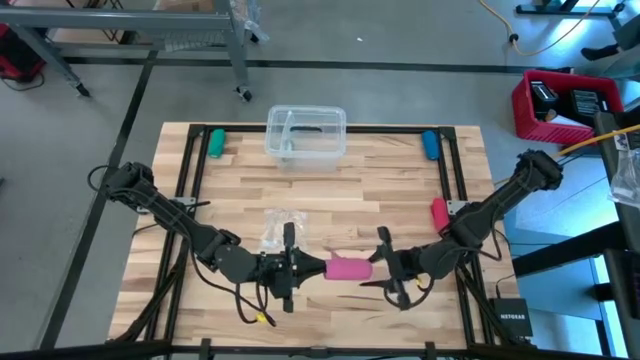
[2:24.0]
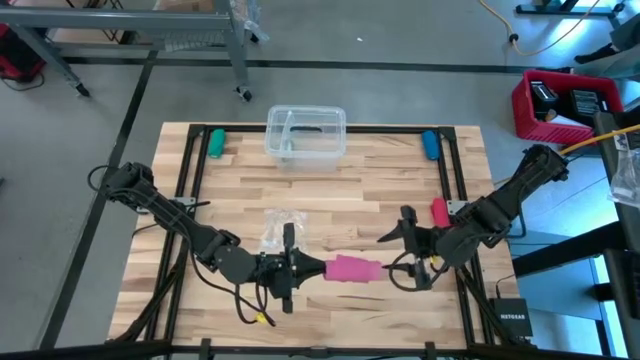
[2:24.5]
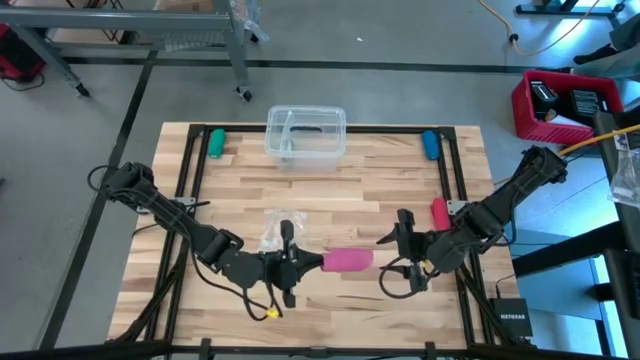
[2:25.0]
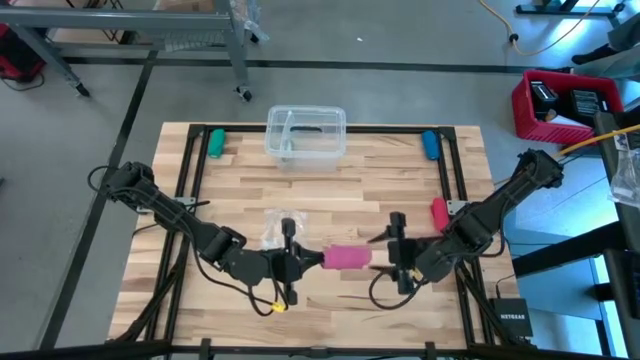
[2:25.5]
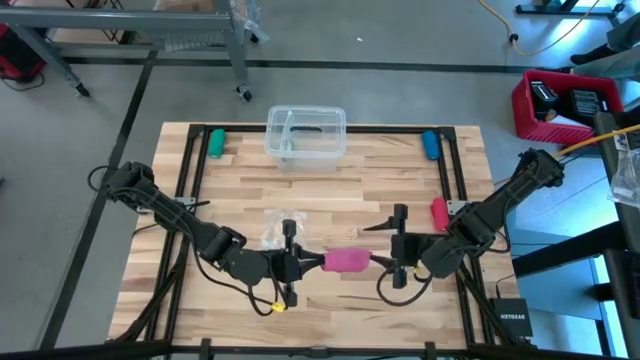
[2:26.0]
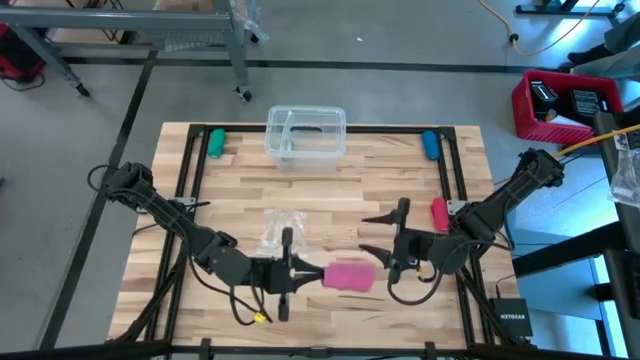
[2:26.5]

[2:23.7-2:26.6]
Task: Roll bandage
Roll the pink bandage

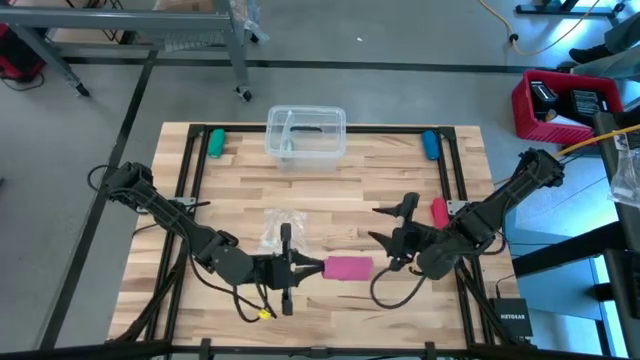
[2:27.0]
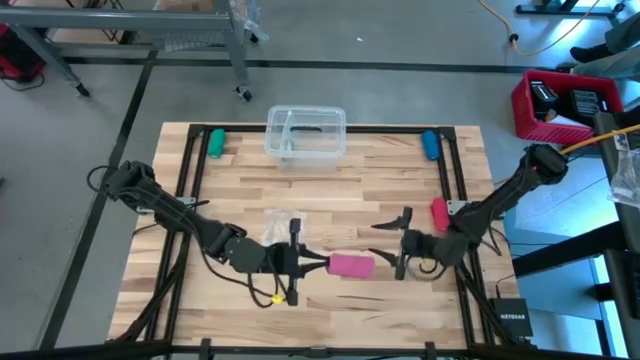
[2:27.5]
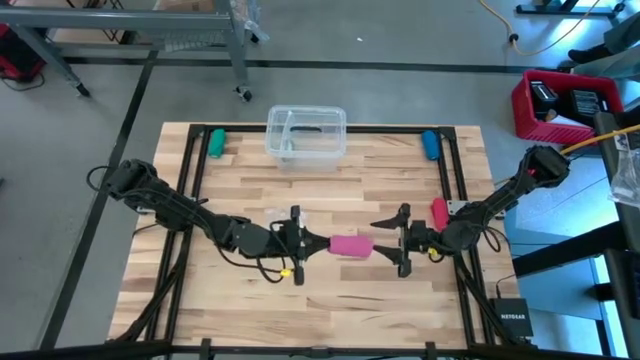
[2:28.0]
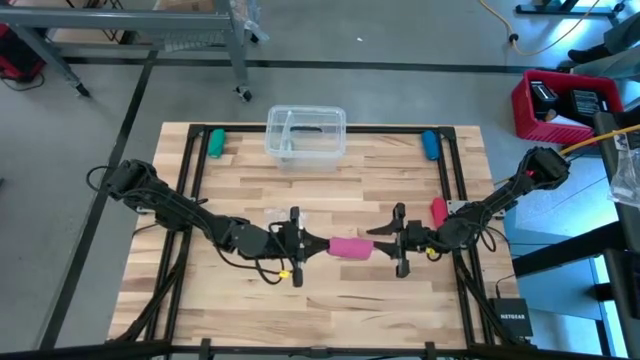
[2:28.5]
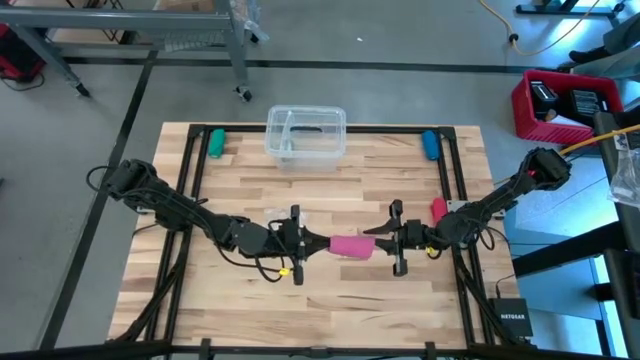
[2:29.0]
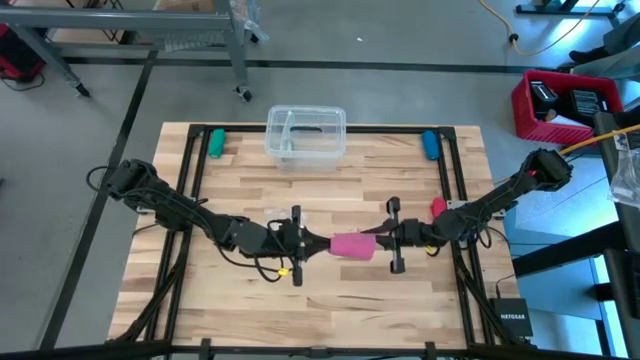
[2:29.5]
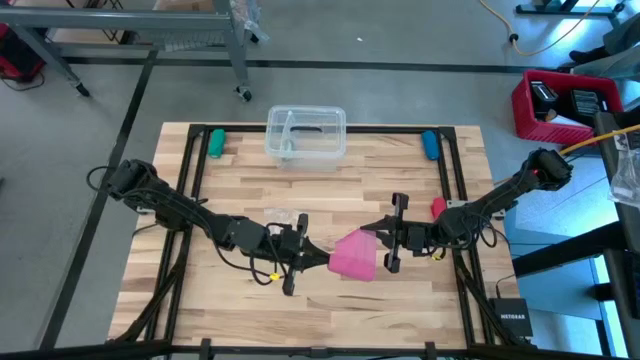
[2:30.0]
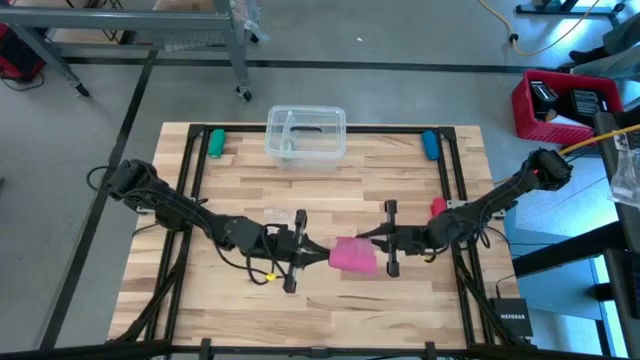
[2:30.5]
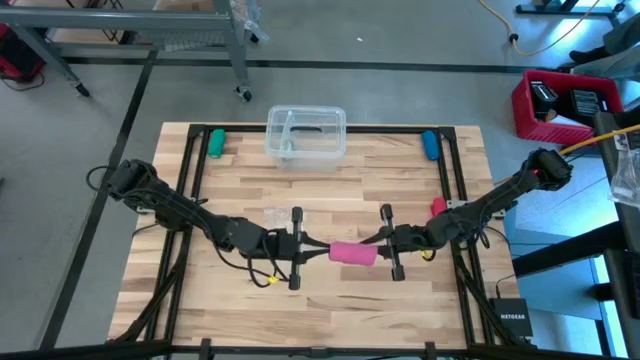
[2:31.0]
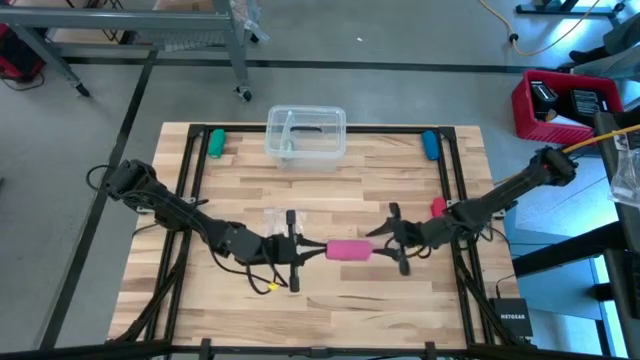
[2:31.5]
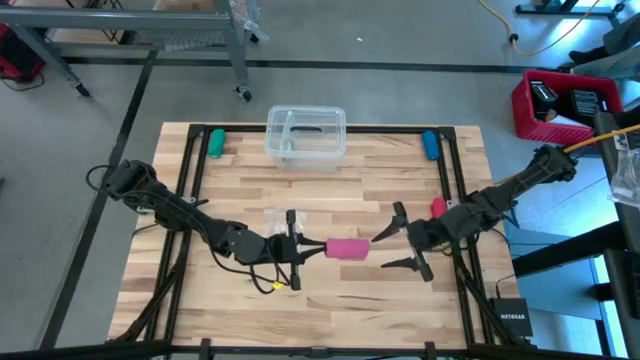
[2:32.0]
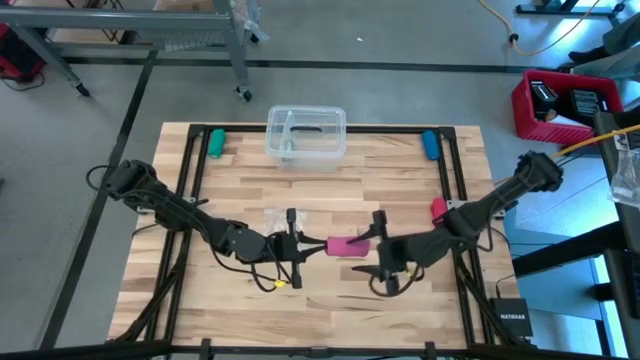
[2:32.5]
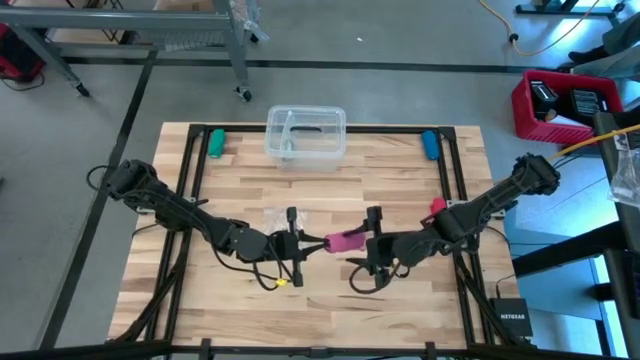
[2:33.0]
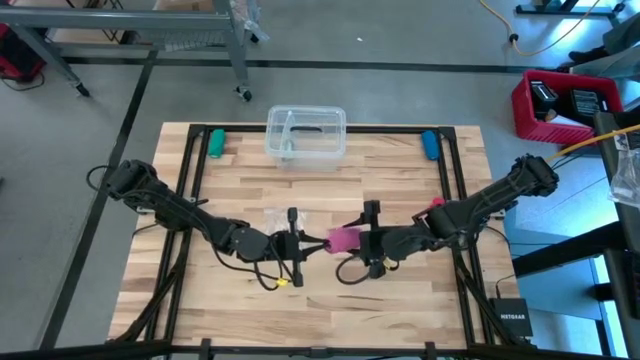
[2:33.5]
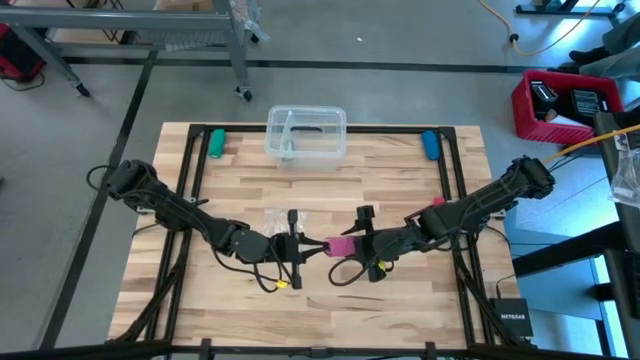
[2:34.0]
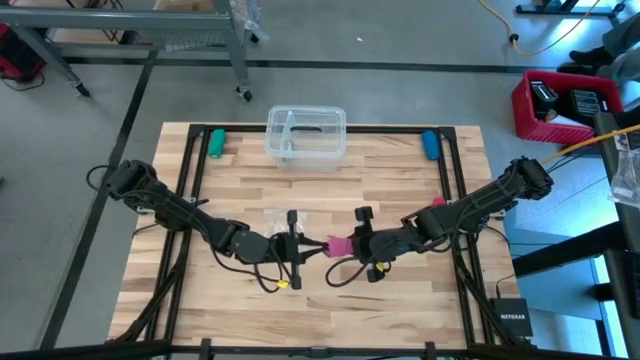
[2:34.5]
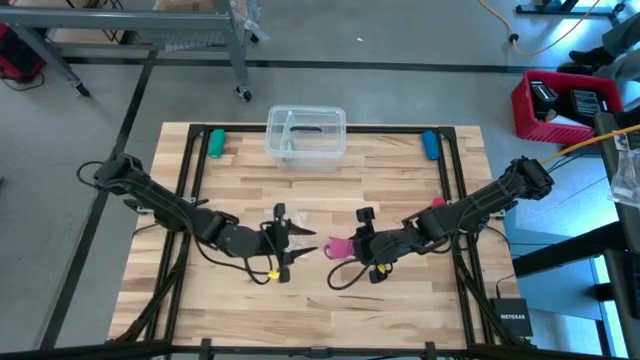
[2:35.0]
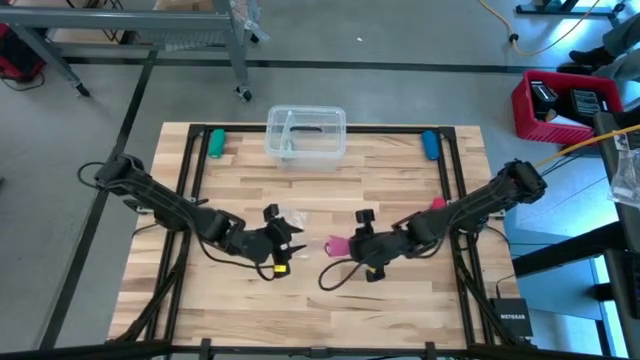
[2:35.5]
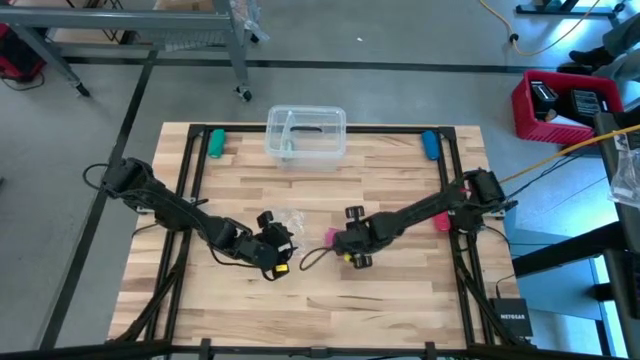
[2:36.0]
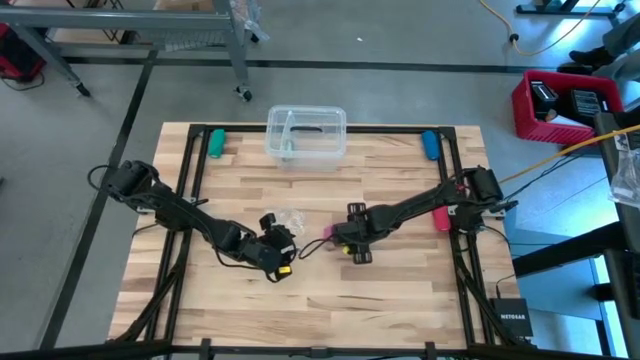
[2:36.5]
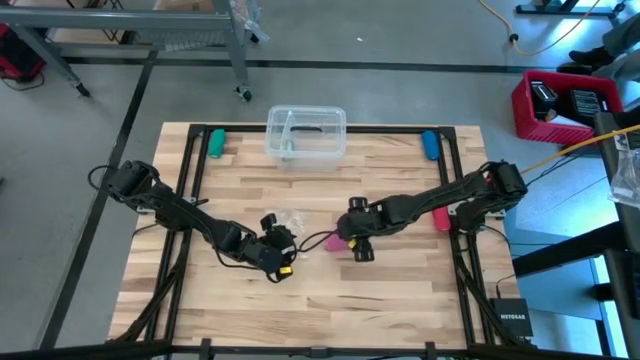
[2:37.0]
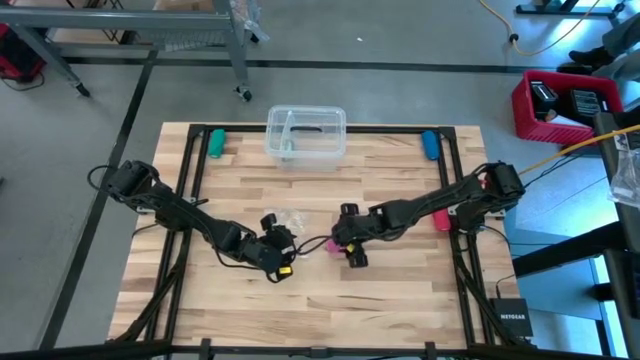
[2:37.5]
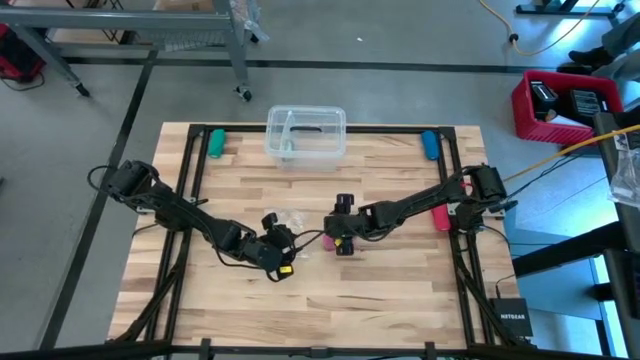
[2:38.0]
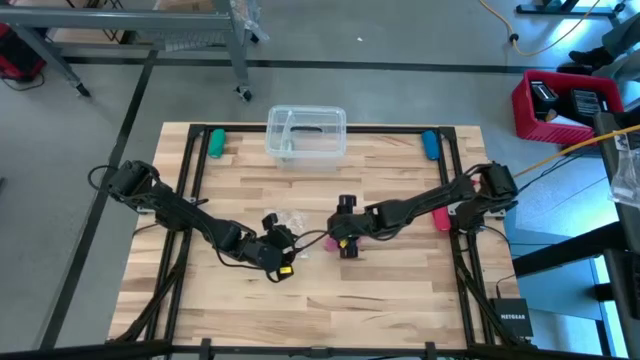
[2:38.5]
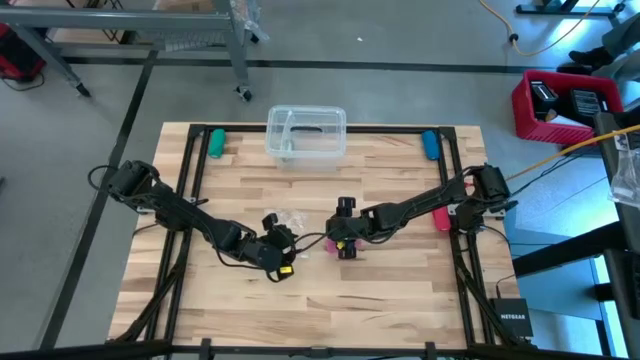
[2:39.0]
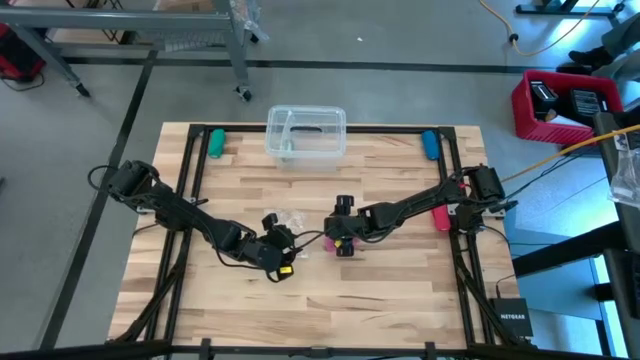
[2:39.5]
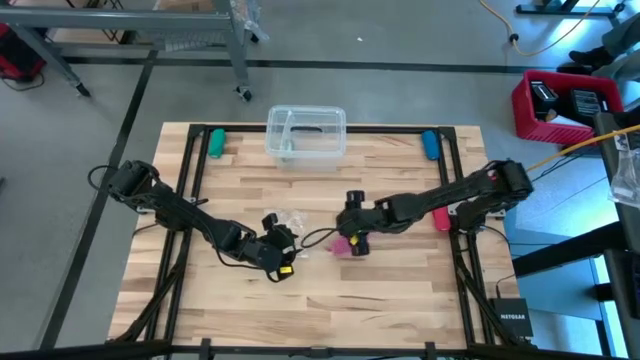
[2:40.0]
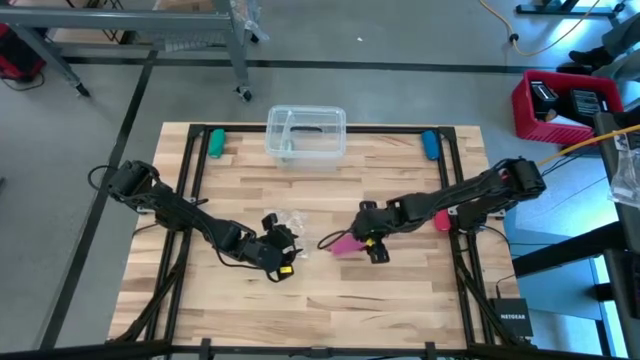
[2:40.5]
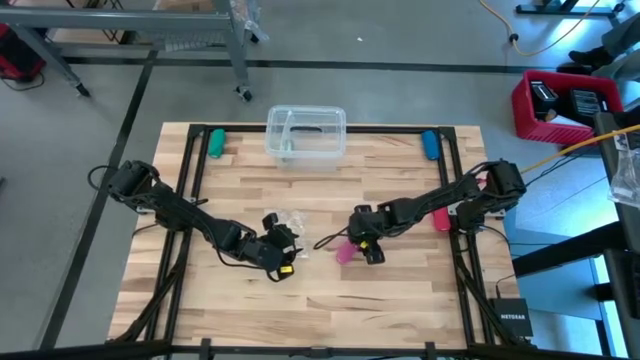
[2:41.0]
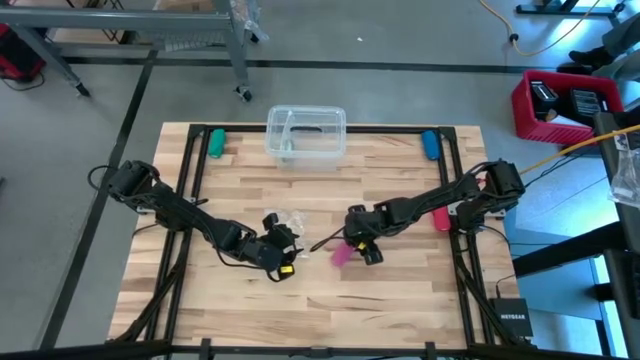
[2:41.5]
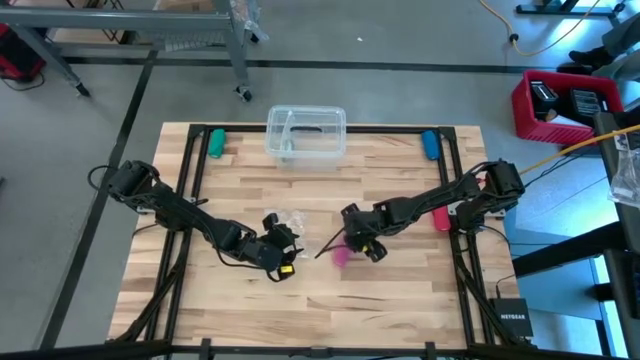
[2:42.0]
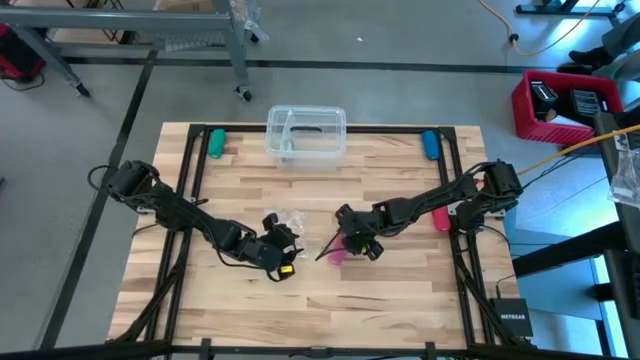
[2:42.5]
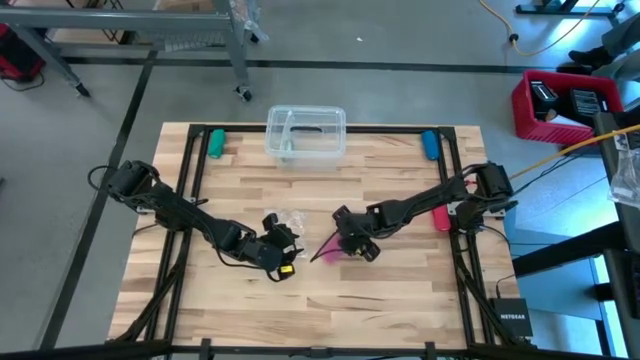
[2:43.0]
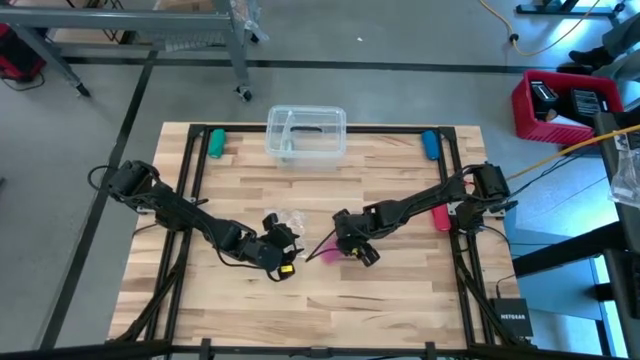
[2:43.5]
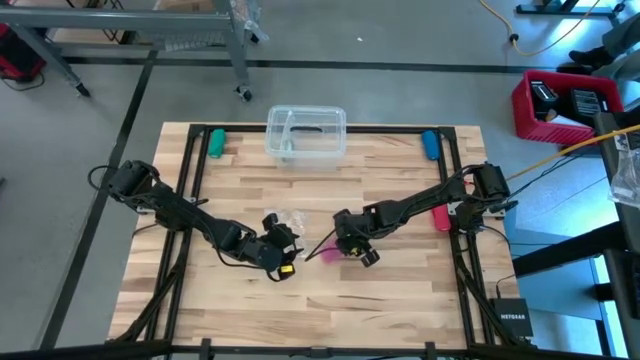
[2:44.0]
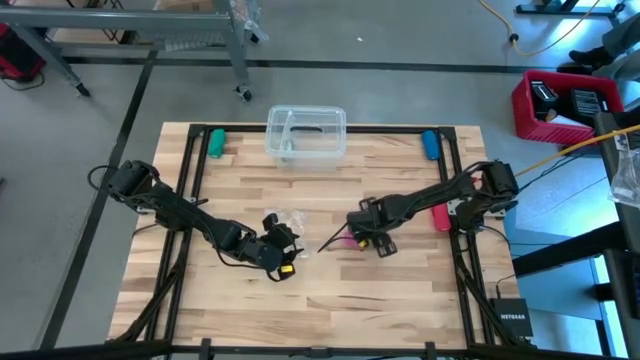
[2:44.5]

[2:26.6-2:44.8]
Roll the pink bandage

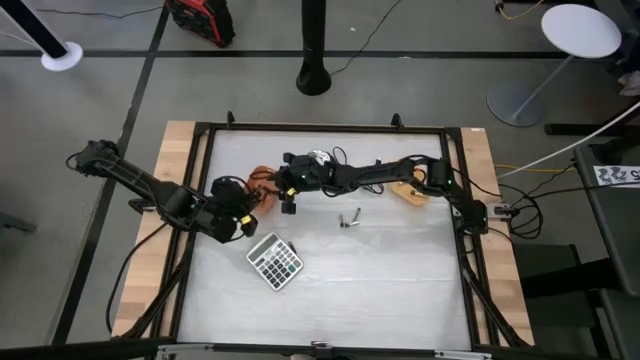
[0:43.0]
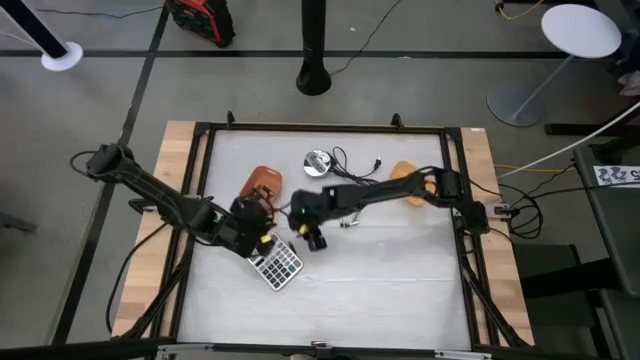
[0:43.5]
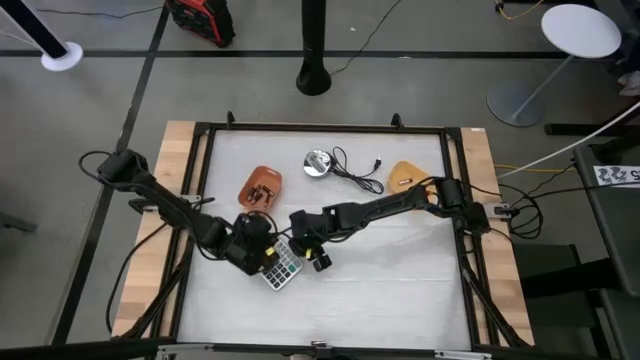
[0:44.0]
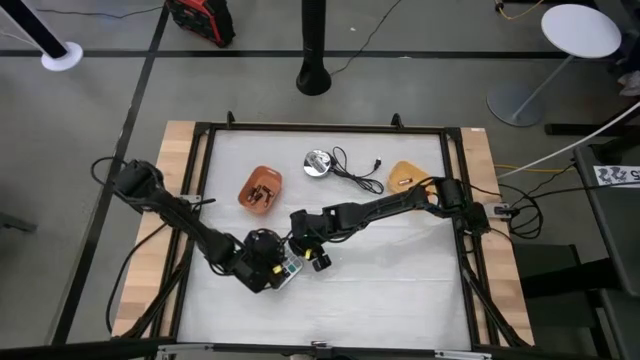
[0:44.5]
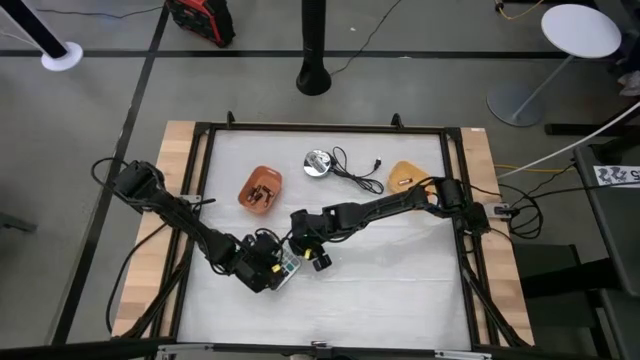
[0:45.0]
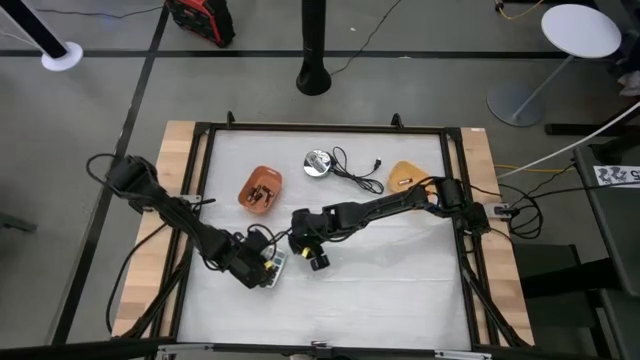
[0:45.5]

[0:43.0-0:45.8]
Task: Sort batteries
Adjust the silver calculator
